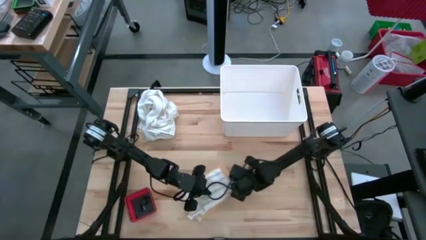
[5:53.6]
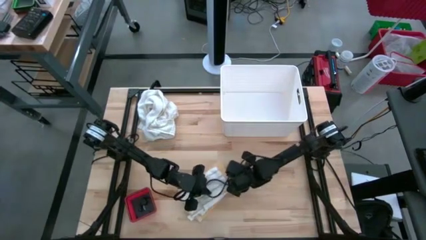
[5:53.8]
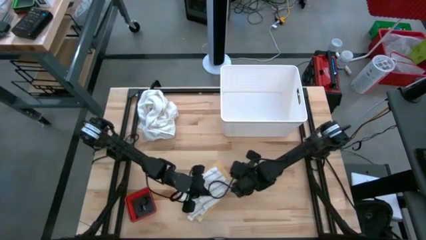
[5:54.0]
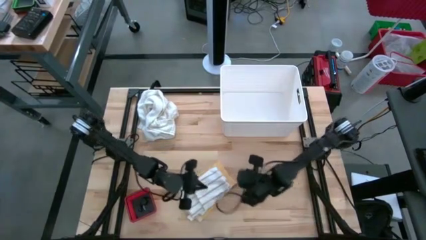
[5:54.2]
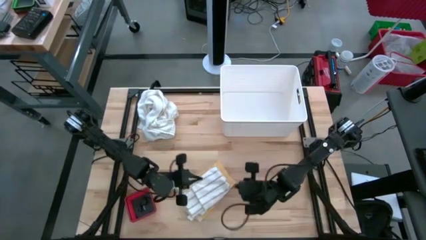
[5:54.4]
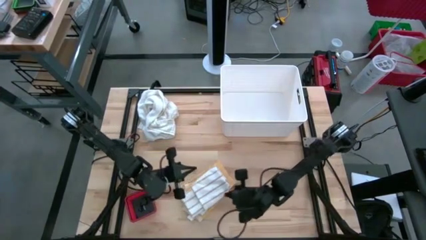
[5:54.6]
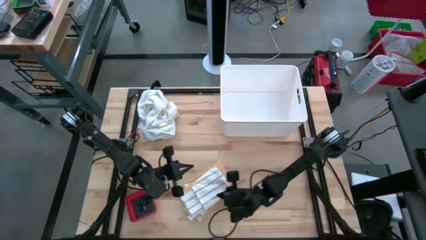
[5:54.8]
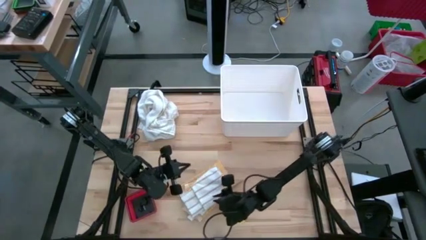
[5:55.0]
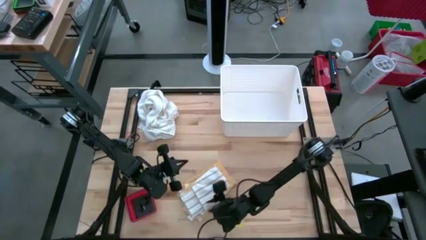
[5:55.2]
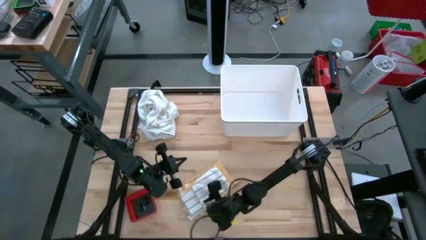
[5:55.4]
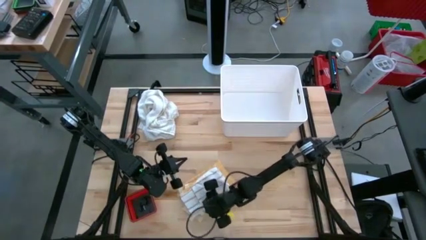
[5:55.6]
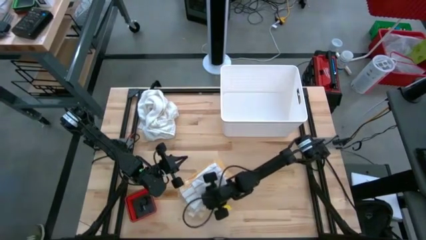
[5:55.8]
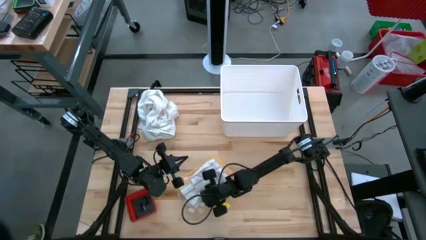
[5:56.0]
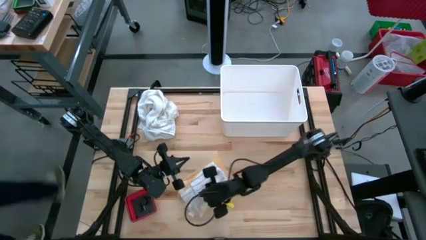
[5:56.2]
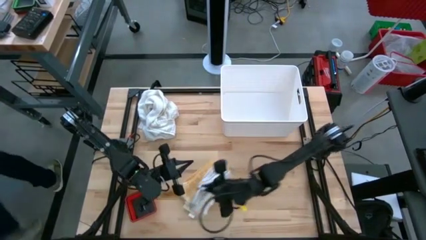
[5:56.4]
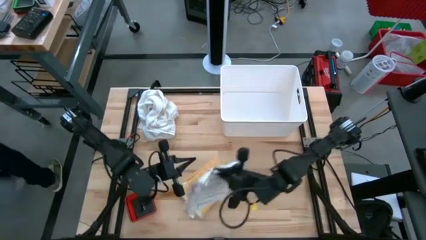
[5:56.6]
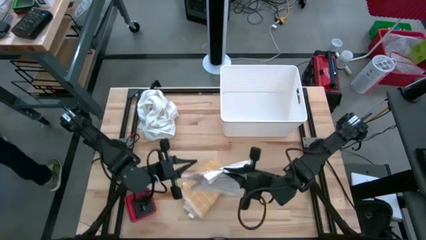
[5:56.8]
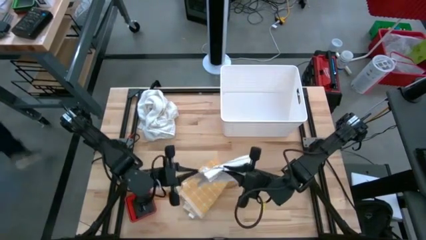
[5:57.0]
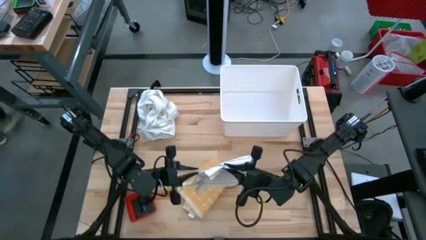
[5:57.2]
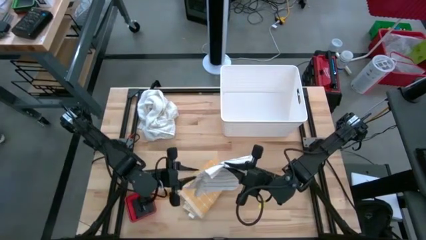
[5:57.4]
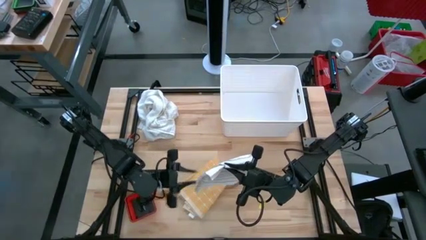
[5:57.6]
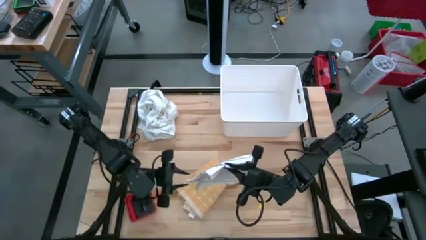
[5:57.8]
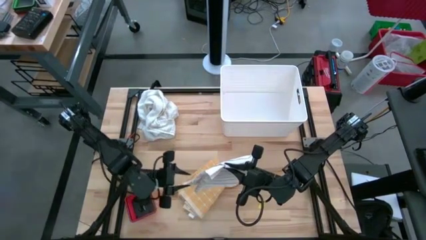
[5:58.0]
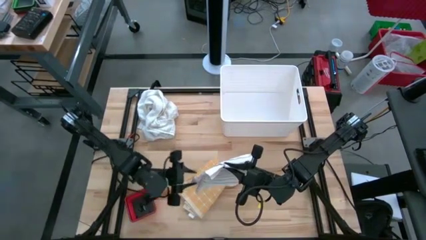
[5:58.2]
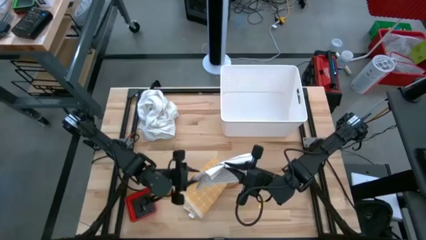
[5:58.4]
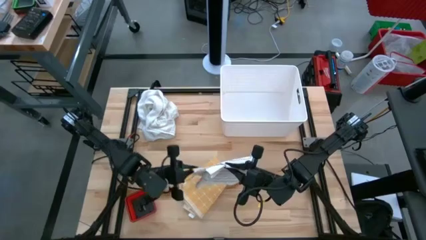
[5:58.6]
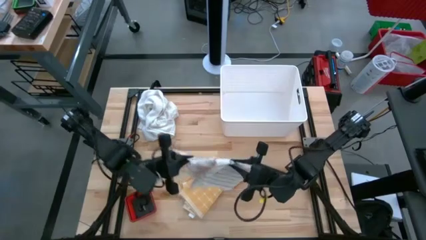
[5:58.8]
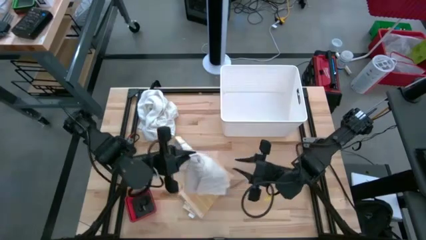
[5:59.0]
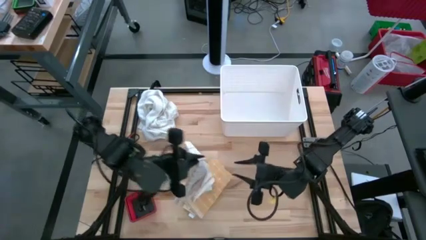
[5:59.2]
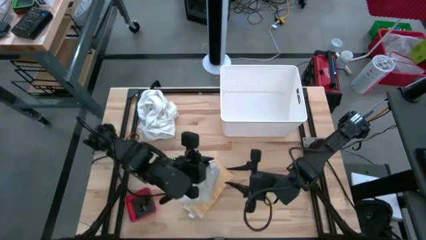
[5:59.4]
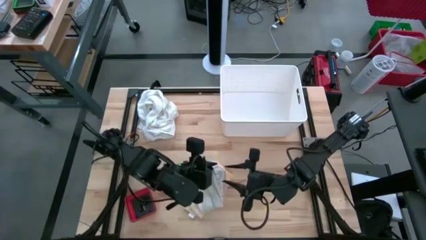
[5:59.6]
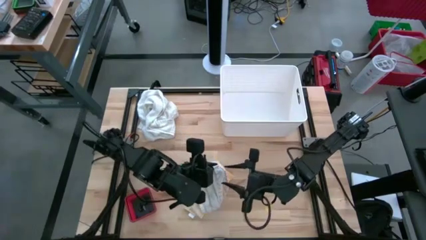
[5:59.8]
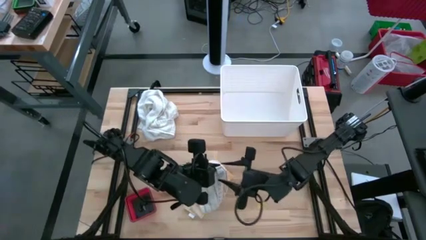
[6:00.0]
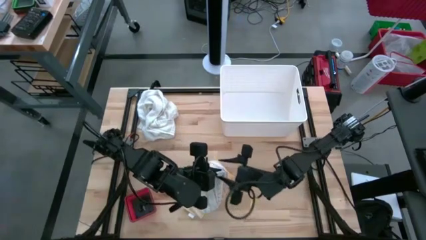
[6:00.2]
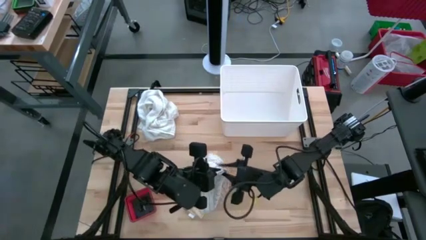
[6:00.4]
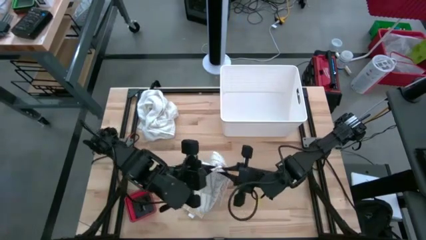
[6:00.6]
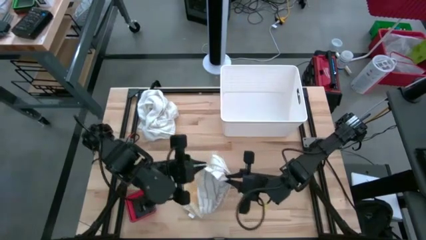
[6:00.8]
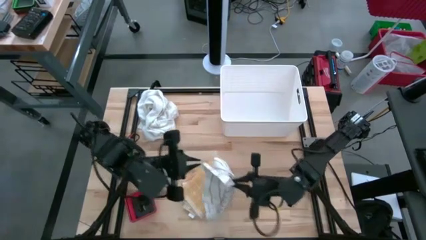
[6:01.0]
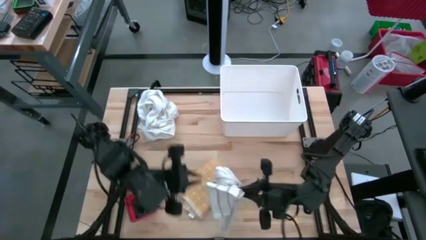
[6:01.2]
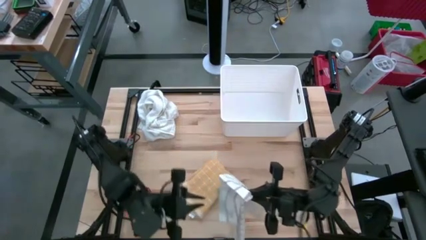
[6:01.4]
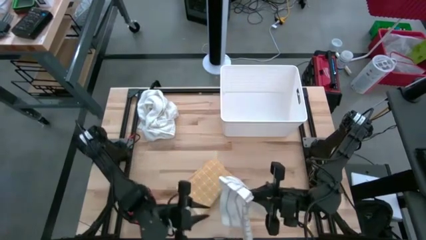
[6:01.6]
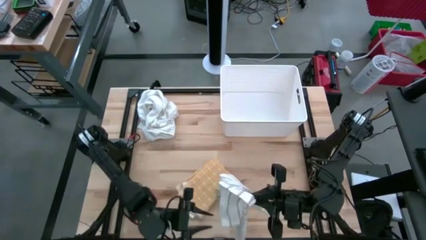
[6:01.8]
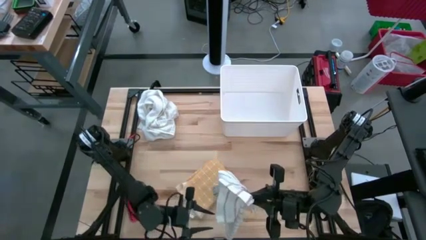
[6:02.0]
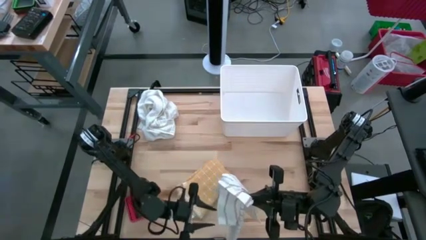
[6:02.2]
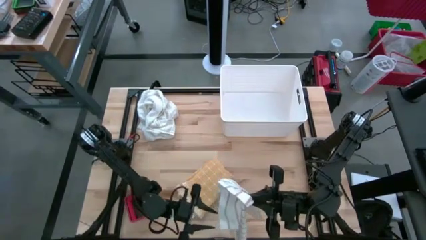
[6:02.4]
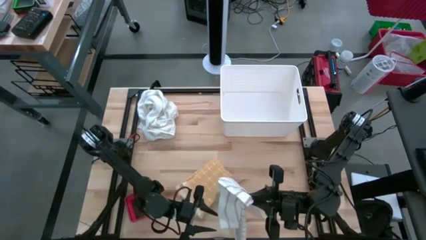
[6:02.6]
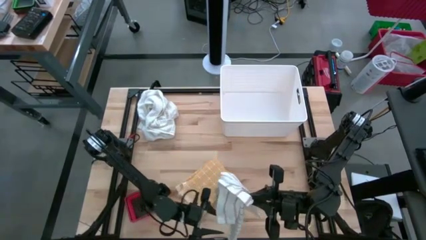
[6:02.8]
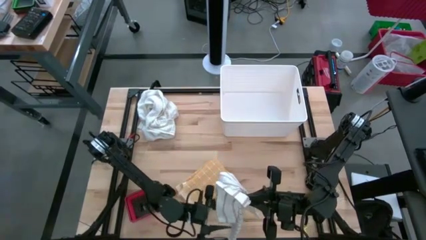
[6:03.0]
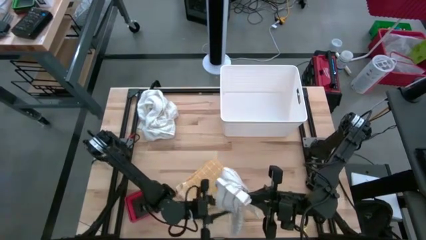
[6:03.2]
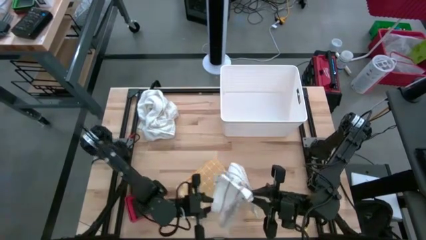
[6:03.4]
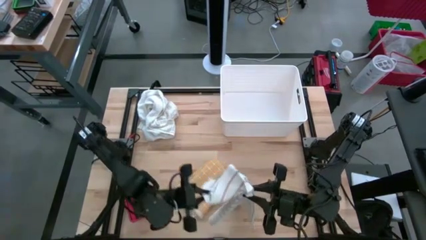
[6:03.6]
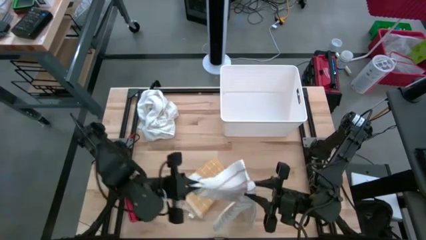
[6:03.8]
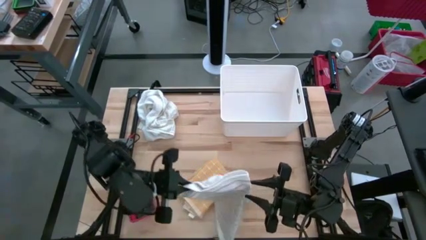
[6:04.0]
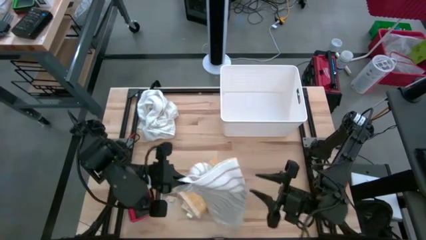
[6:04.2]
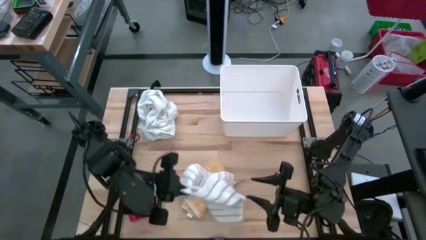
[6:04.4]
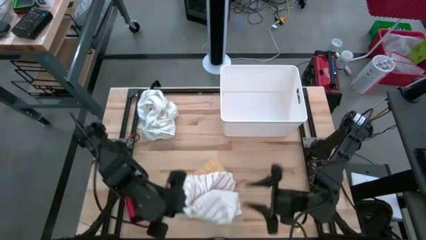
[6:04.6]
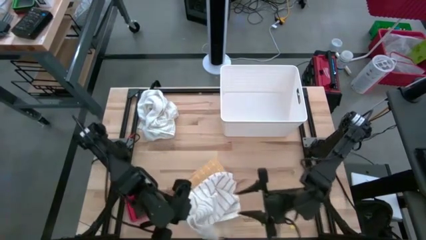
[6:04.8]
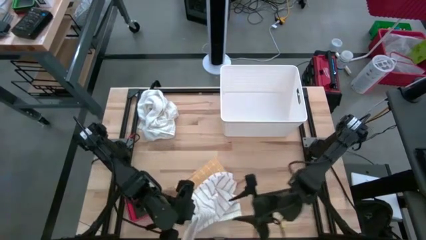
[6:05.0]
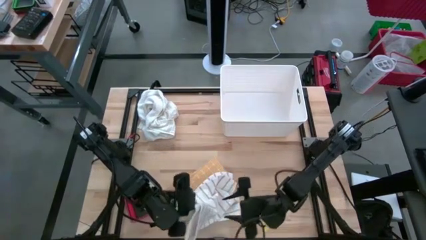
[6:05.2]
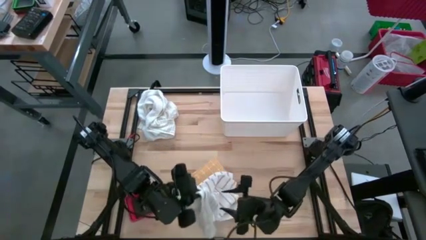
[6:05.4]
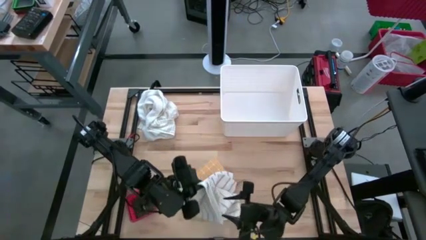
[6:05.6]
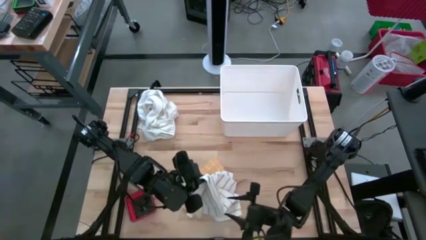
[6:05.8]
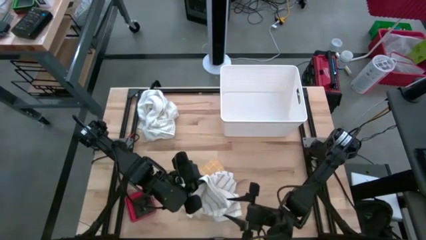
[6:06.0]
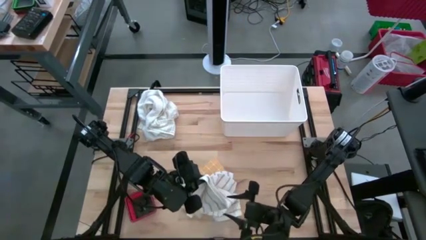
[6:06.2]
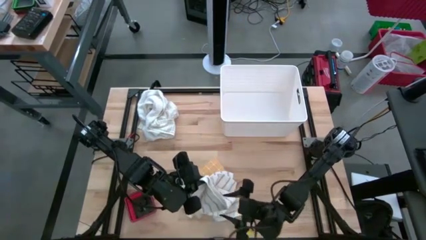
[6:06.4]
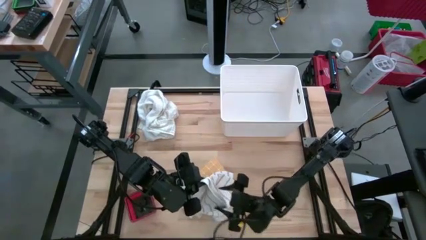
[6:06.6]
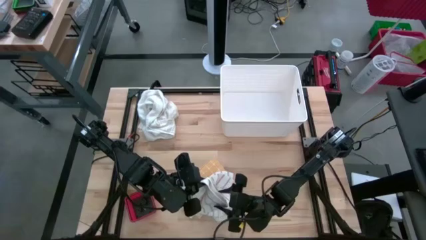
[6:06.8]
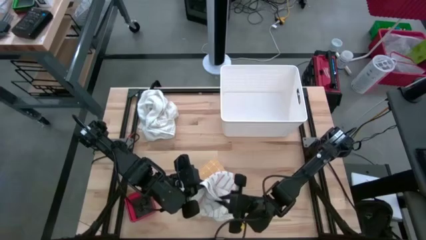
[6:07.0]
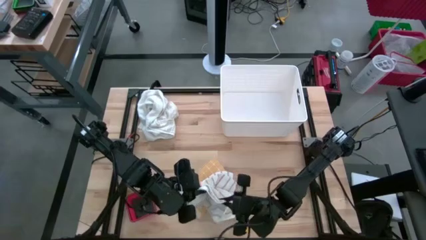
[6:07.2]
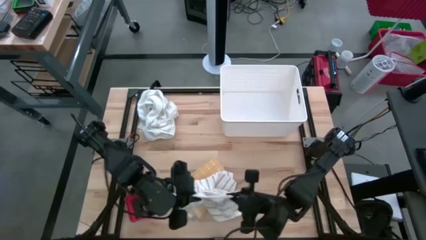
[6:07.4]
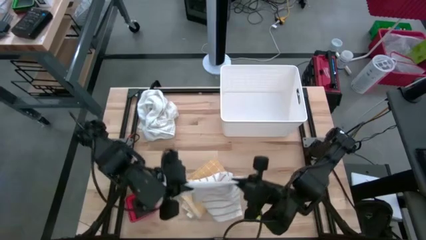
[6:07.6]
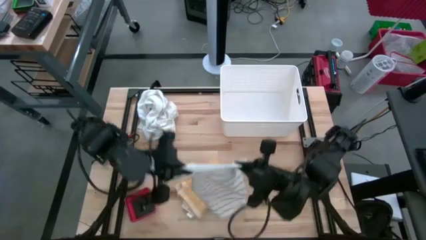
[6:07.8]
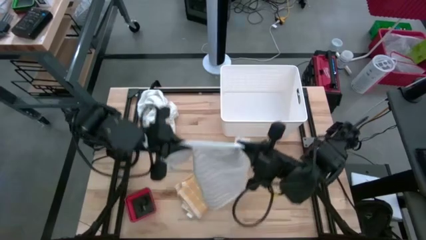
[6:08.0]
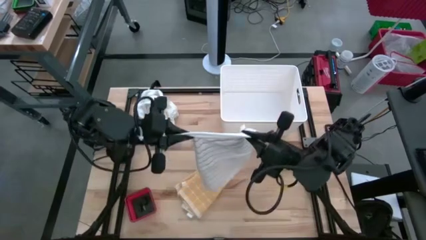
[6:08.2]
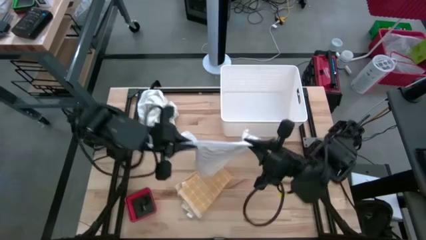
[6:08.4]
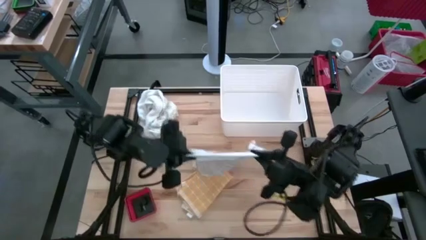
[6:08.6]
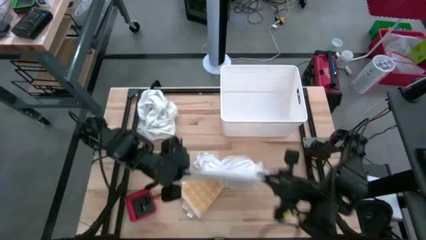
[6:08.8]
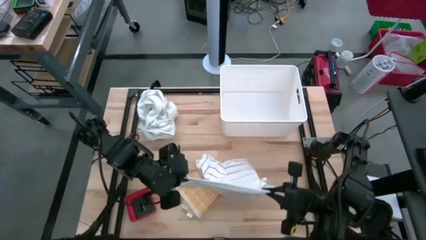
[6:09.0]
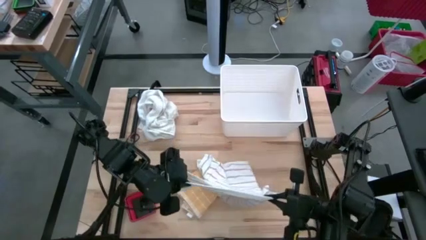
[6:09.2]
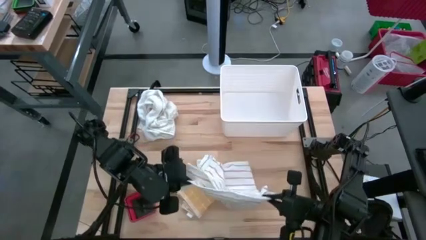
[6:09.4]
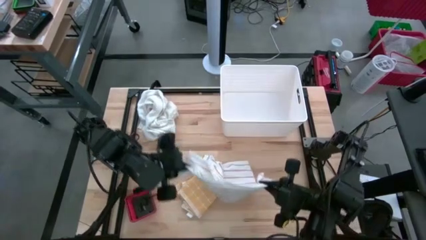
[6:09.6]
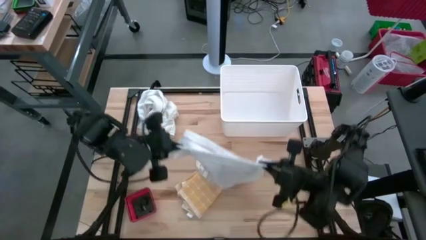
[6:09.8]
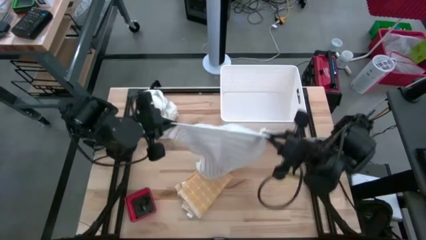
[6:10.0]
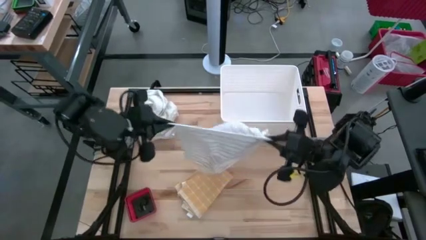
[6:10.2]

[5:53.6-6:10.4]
Task: Fold towel
Fold the white kitchen towel

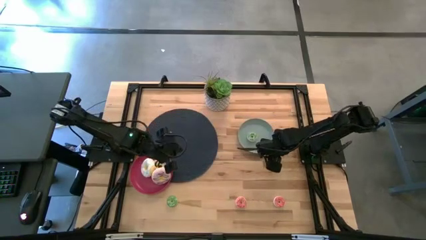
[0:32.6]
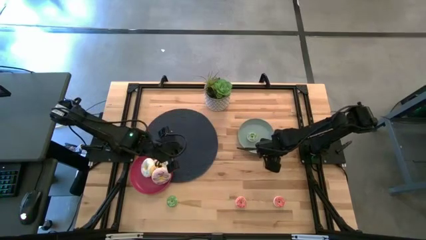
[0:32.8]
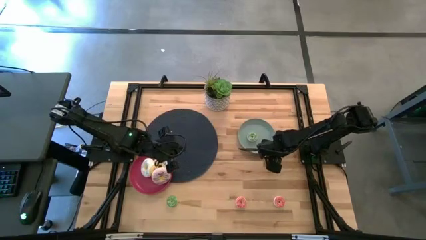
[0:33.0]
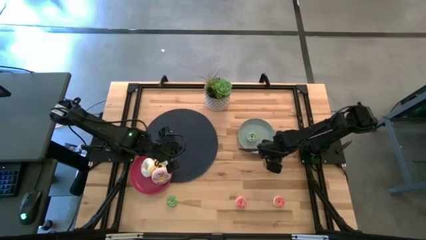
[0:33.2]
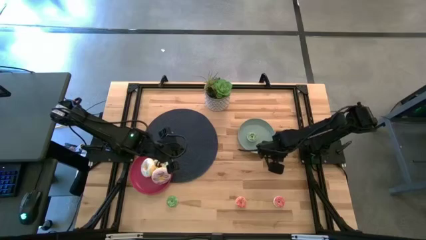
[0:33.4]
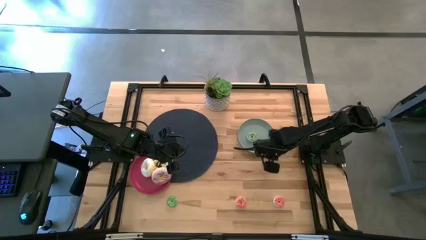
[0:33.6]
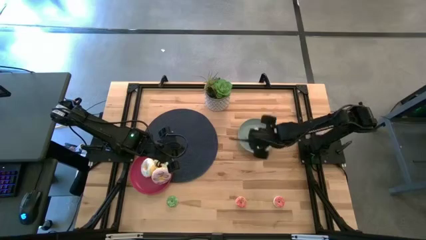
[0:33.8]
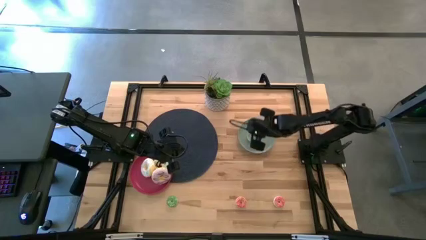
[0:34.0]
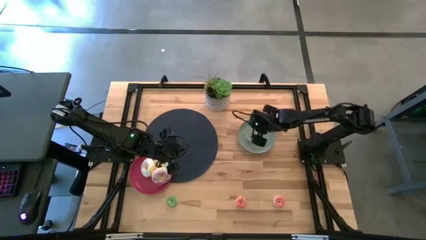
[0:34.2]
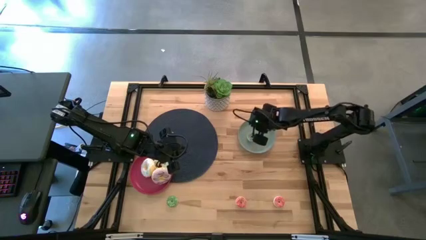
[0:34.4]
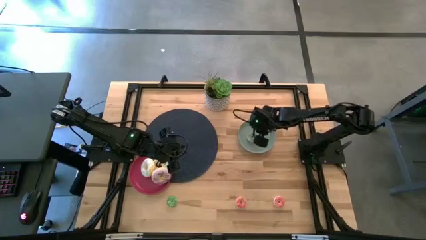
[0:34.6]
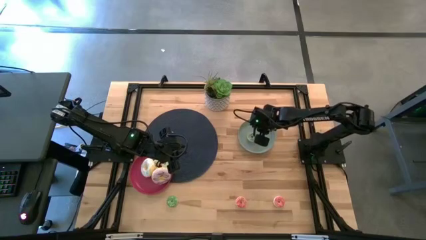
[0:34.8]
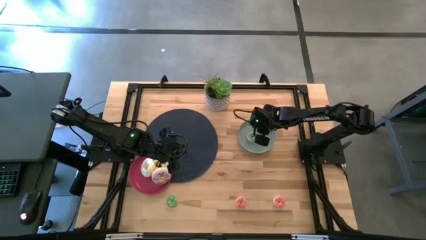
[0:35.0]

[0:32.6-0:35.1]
Task: Pick & Place donuts
Put the small yellow donut on the blue plate
